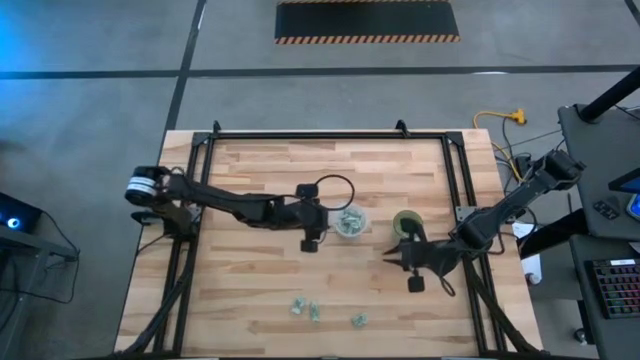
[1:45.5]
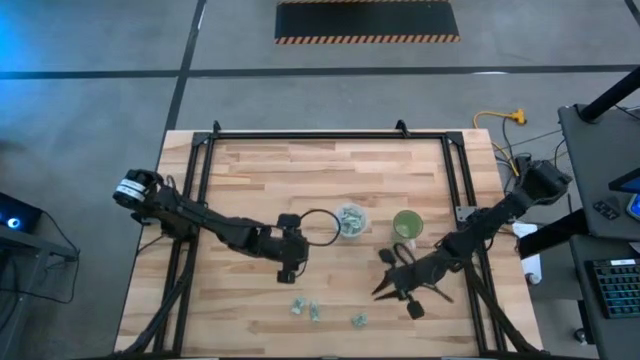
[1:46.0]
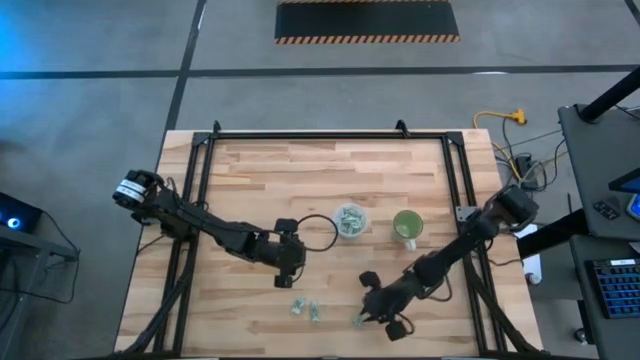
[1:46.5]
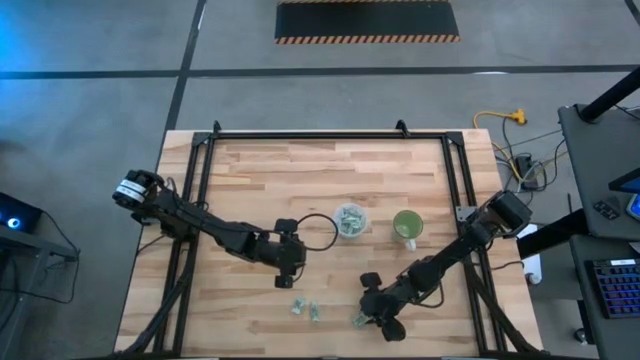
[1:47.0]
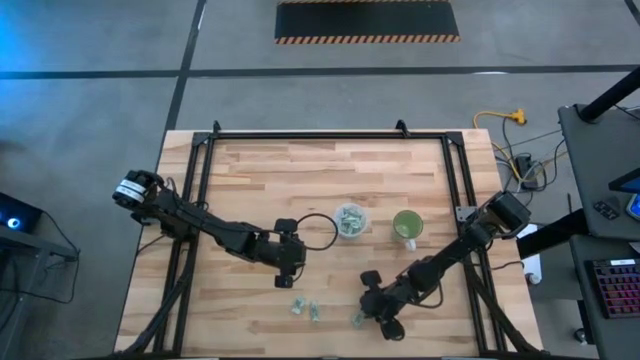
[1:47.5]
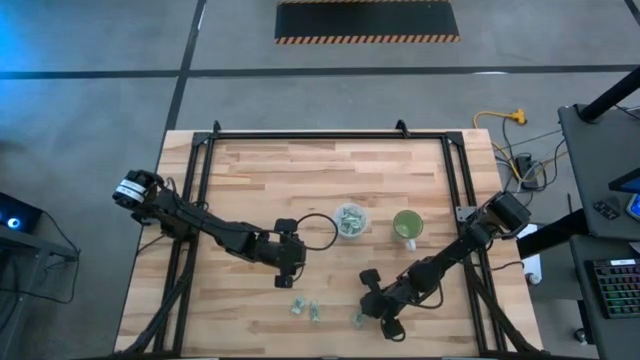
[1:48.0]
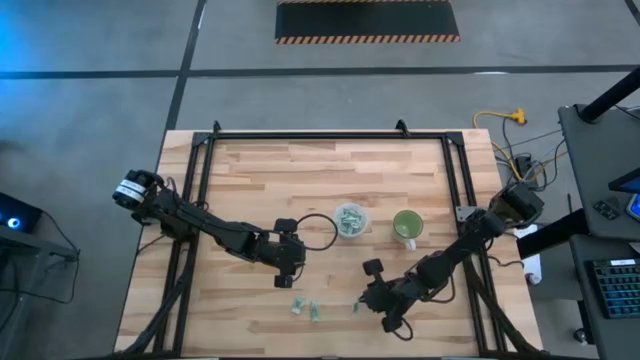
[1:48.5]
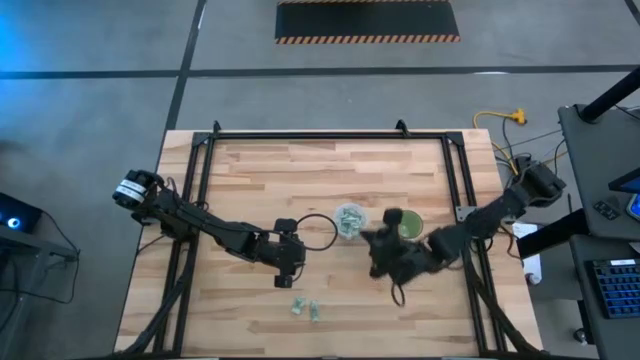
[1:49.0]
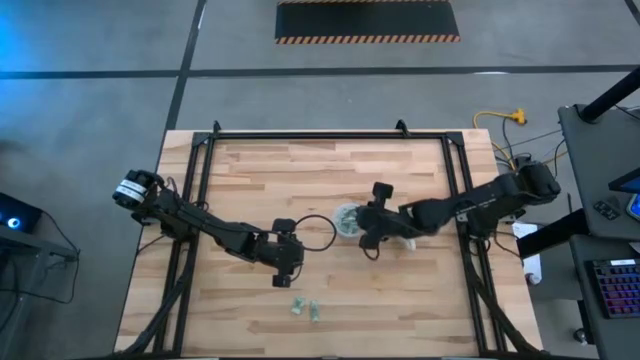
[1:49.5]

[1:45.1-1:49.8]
Task: Pick and place Stevia / Truvia into bins
Put the green stevia packet into the transparent container

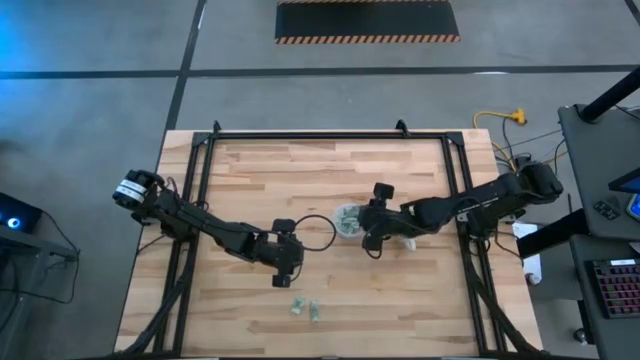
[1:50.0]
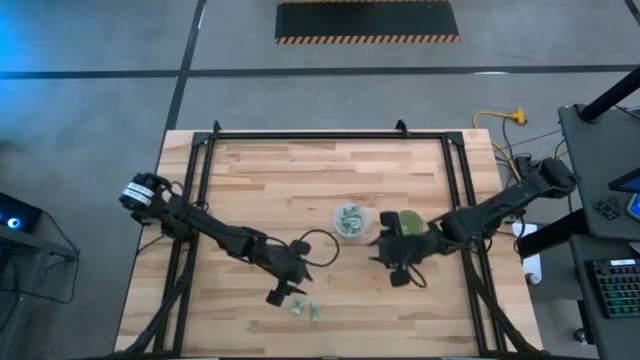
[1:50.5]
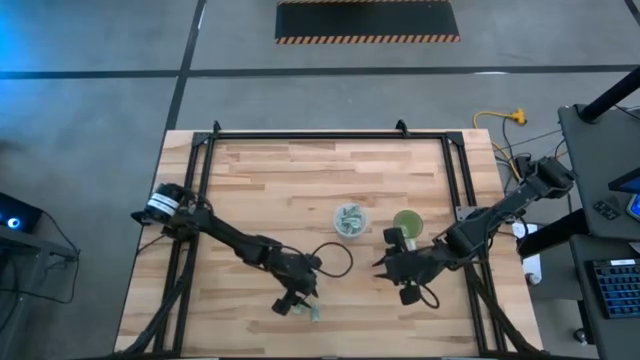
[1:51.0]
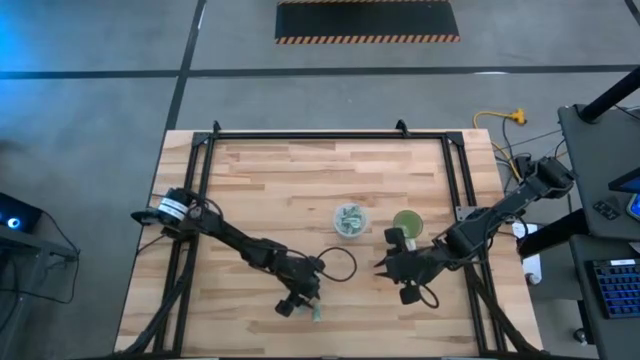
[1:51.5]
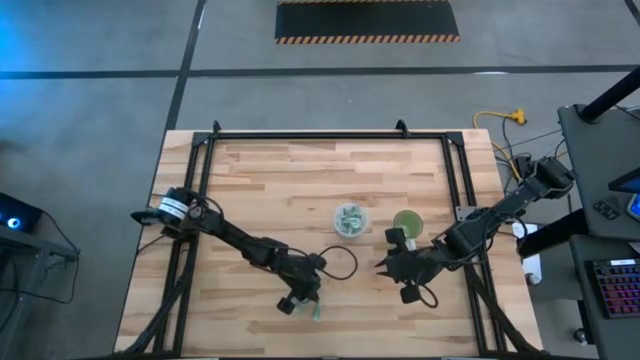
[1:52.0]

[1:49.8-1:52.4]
Put the green stevia packet into the transparent container

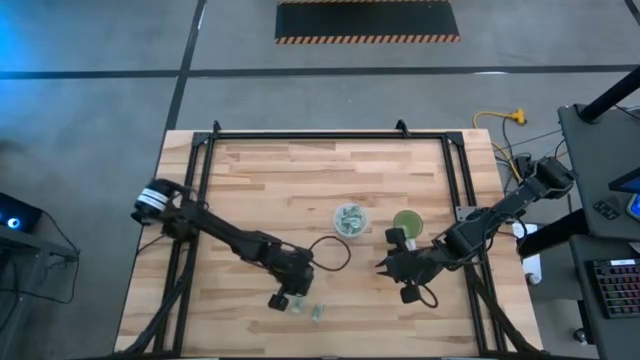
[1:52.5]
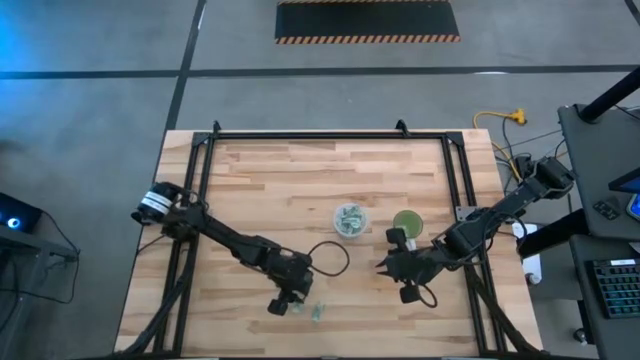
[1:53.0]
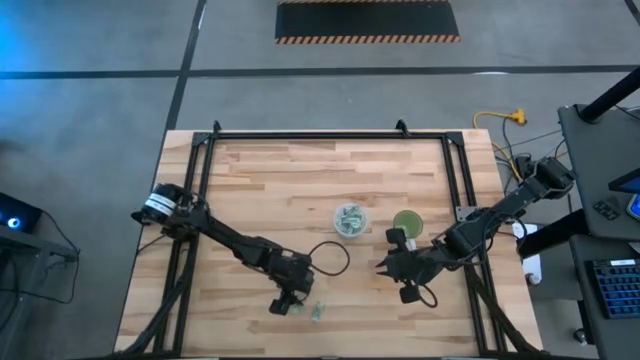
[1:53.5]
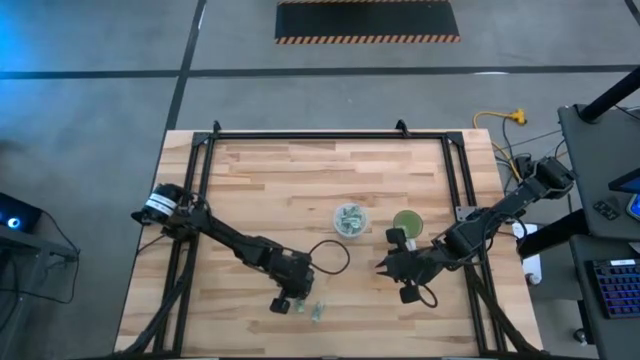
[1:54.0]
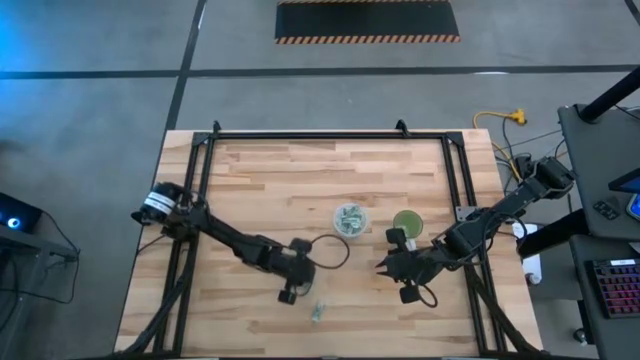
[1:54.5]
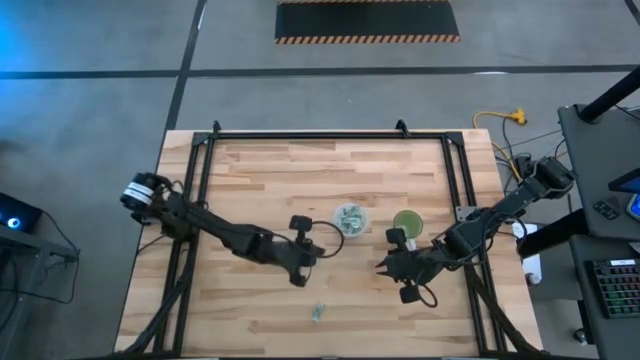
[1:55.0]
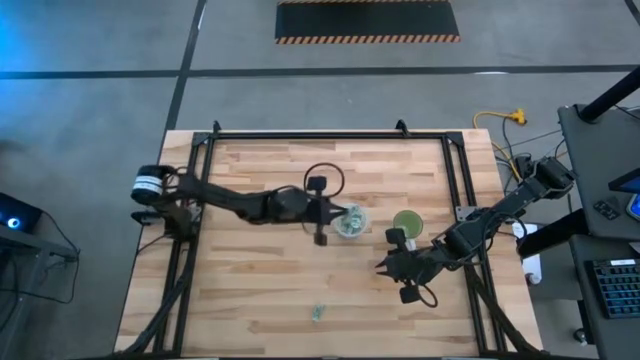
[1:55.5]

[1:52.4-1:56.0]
Put the green stevia packet into the transparent container

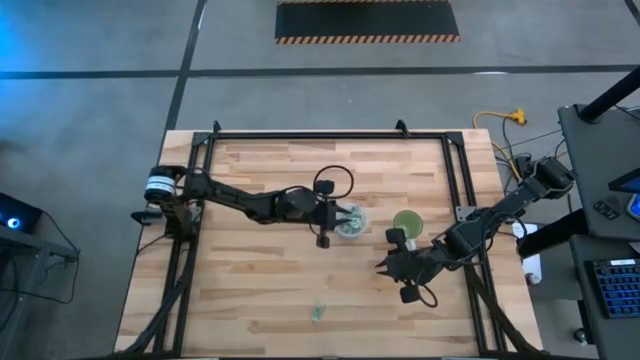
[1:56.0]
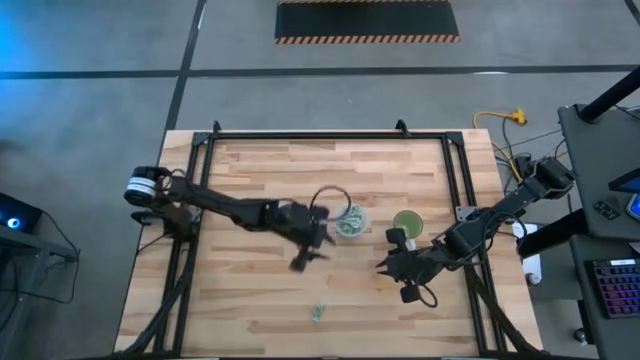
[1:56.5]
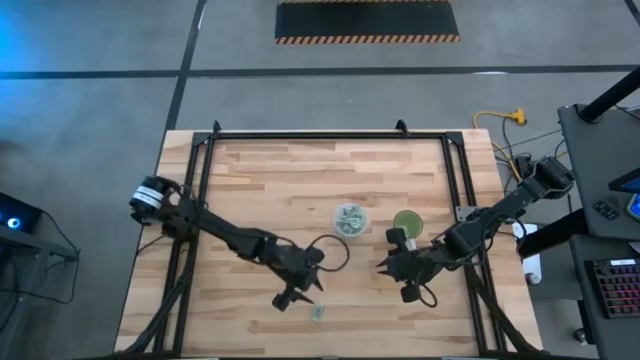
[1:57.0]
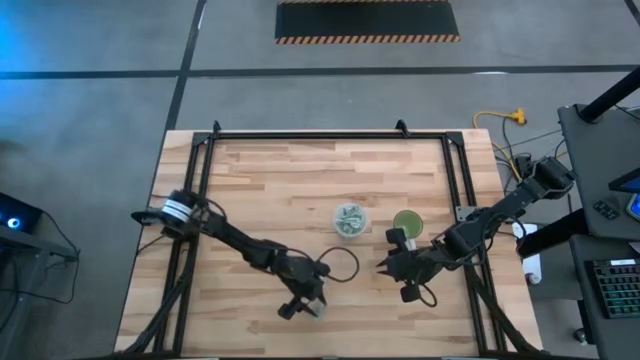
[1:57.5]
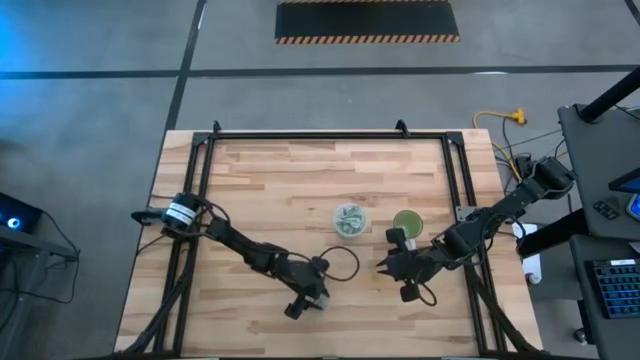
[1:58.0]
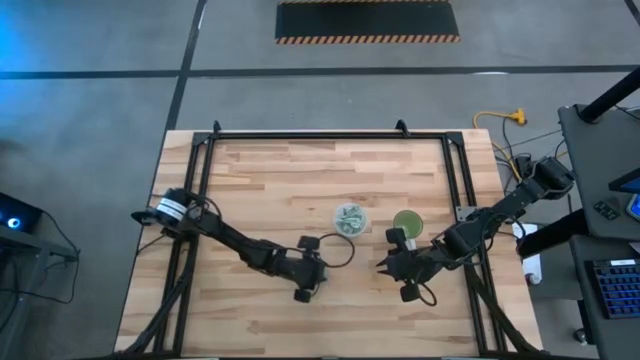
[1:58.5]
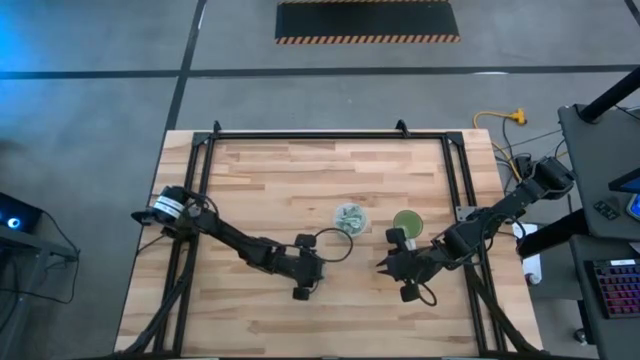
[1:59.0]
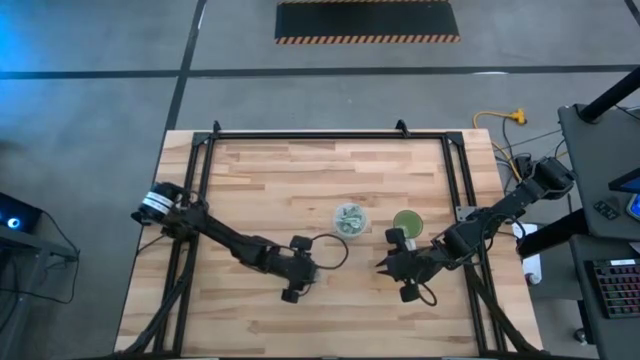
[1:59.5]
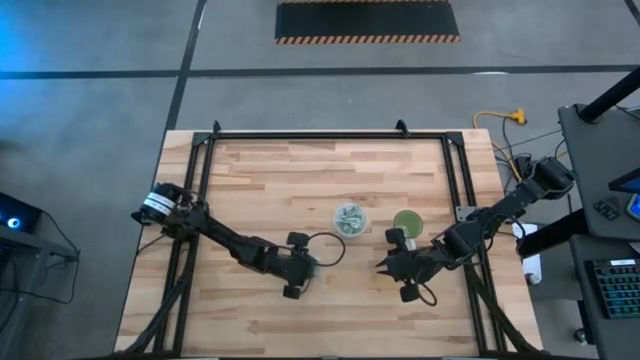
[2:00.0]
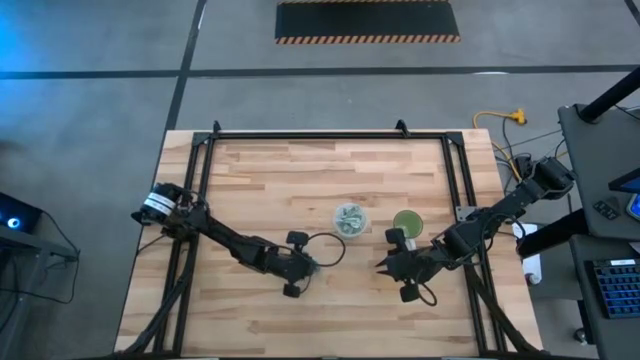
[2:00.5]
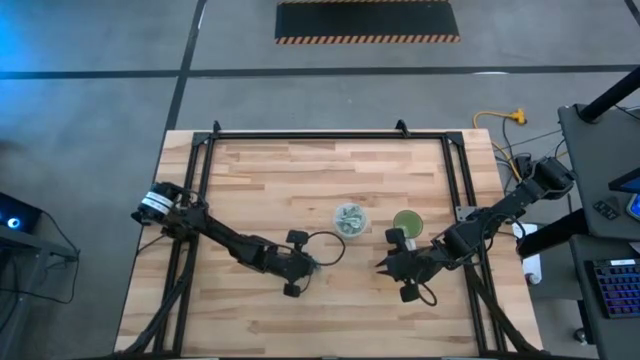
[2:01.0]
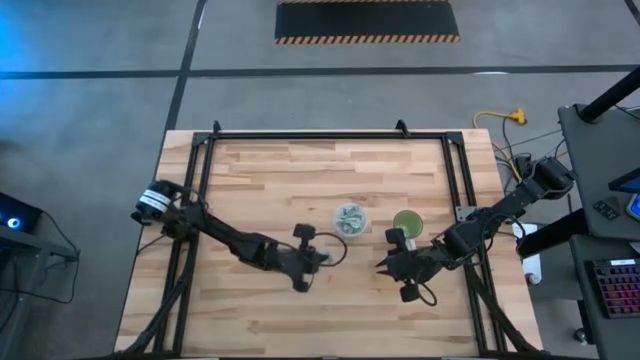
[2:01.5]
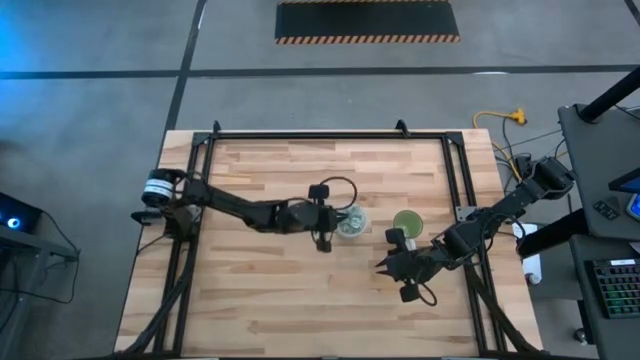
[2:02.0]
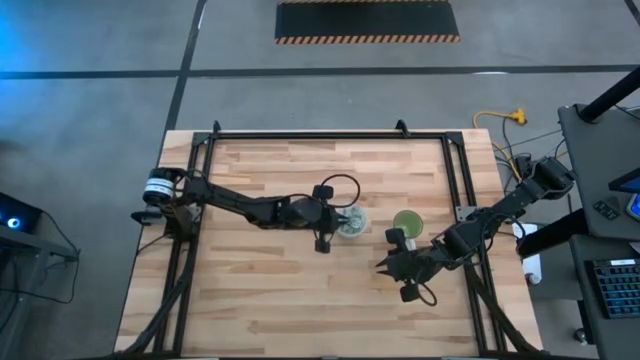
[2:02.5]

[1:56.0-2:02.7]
Put the green stevia packet into the transparent container

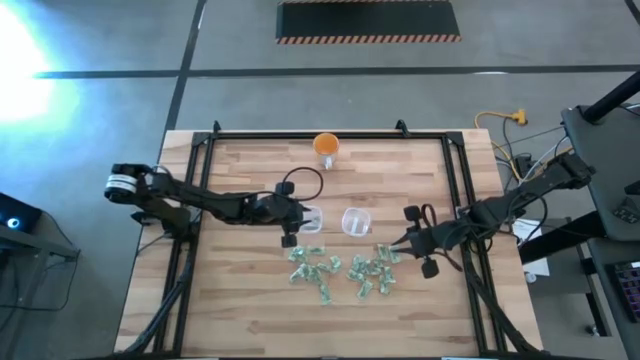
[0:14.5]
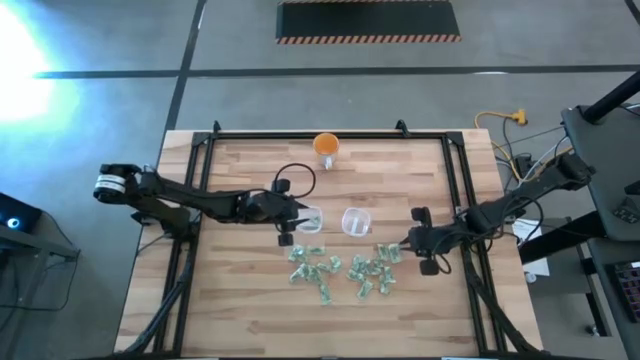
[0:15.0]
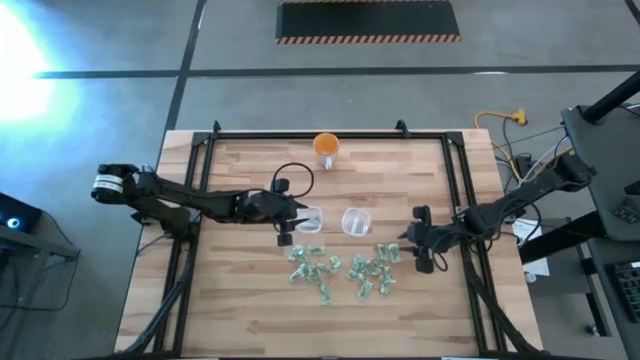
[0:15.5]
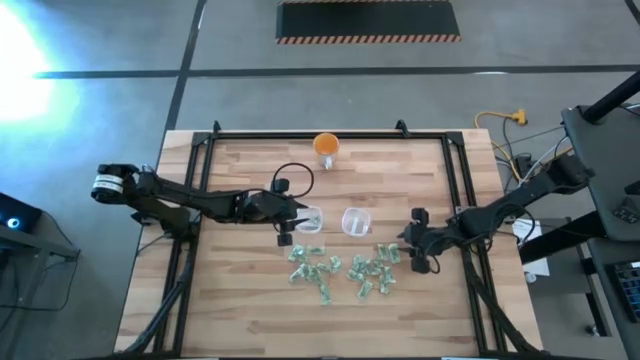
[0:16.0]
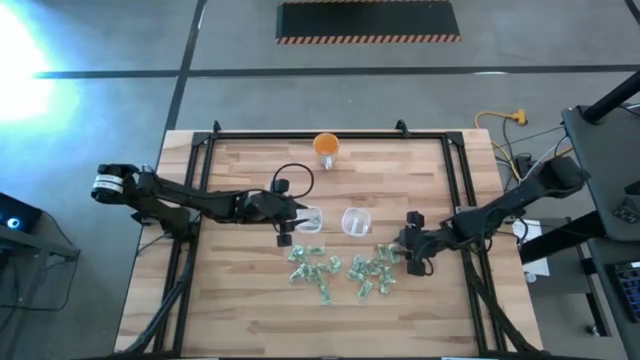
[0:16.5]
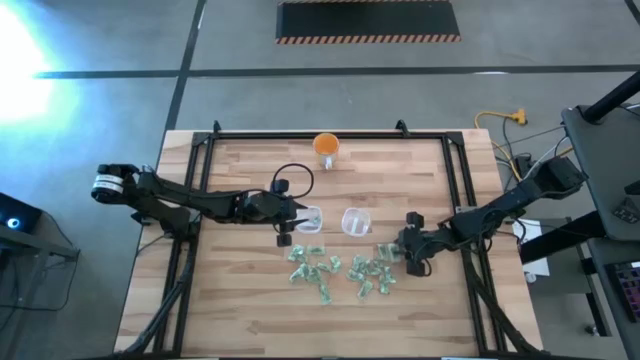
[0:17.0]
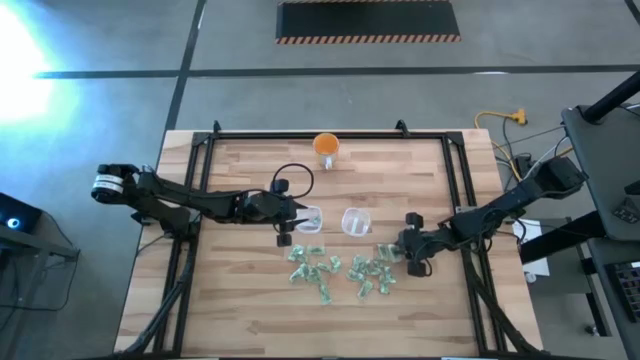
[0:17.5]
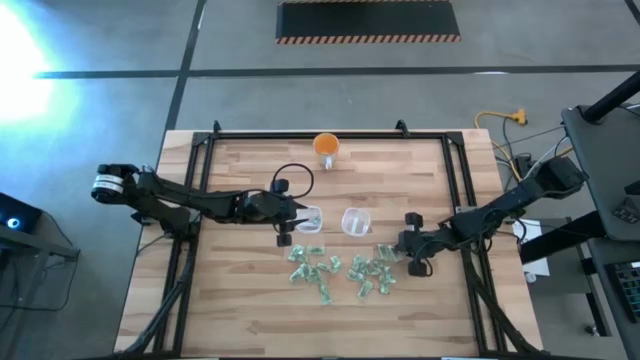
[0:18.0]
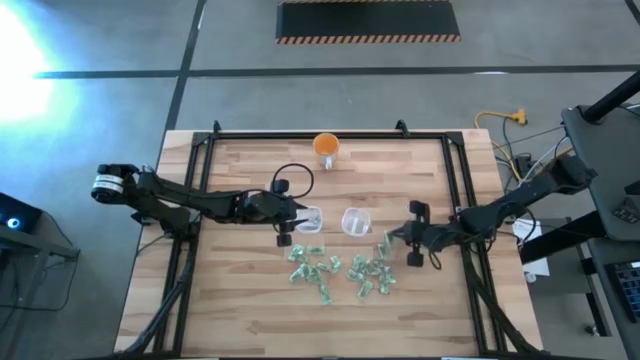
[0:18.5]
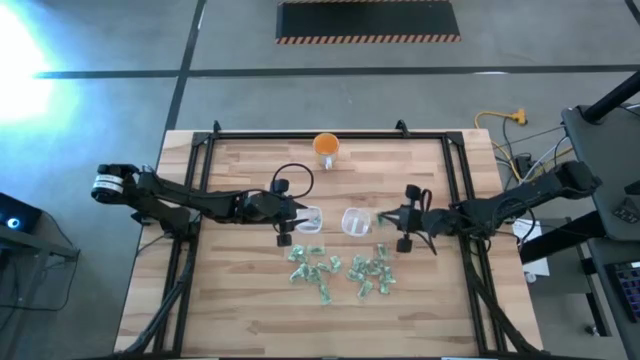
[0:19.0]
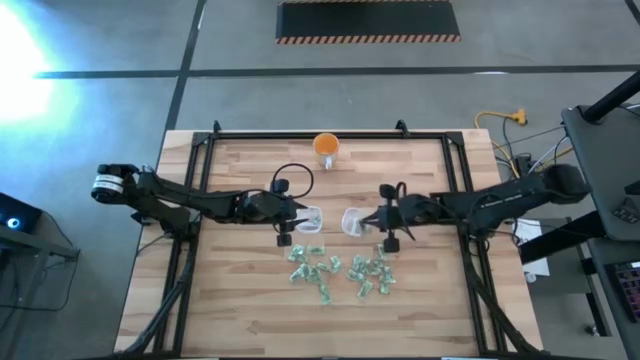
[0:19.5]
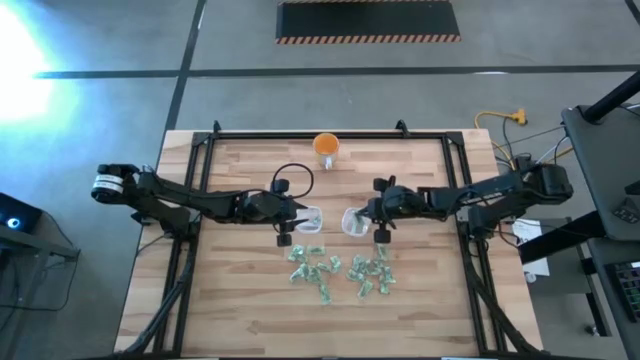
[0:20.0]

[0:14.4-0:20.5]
Task: Pick and place Stevia / Truvia into bins
Put the green stevia packet into the right transparent container
